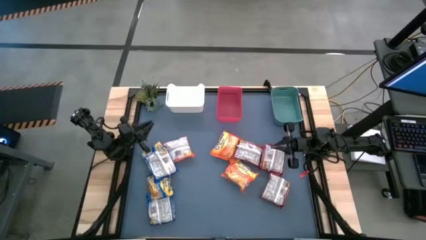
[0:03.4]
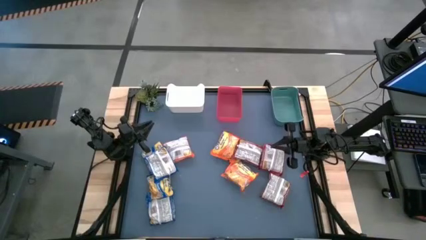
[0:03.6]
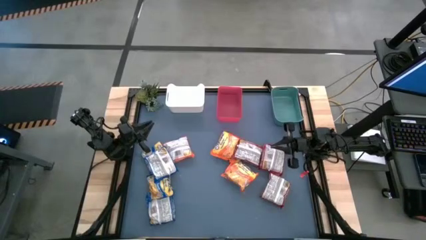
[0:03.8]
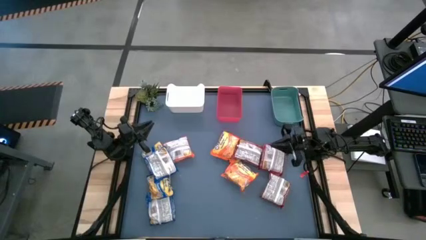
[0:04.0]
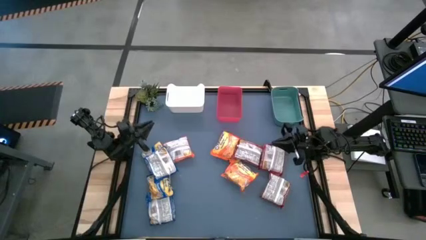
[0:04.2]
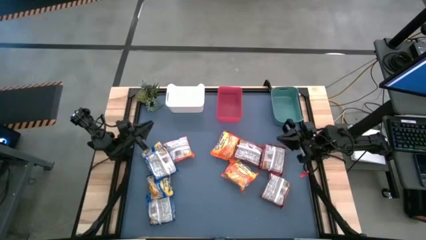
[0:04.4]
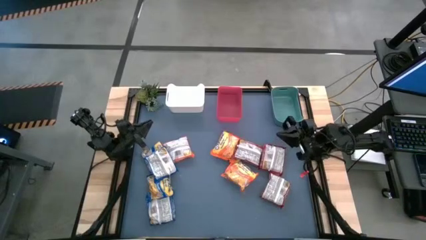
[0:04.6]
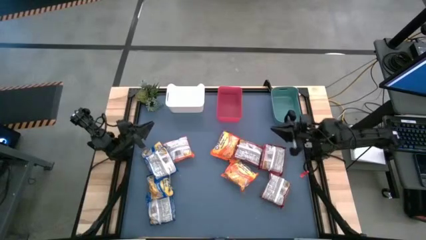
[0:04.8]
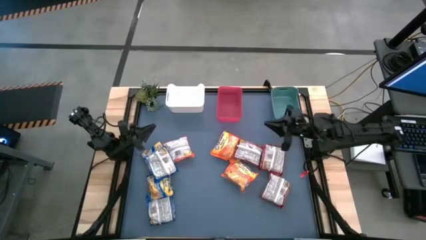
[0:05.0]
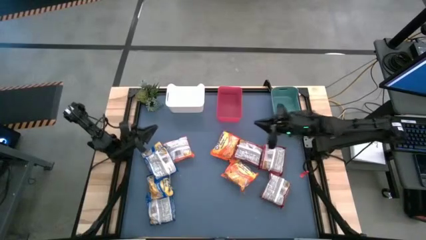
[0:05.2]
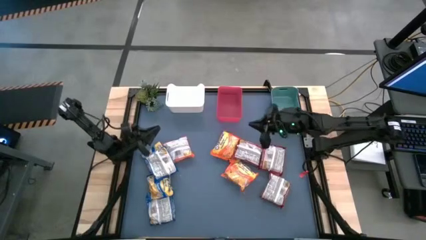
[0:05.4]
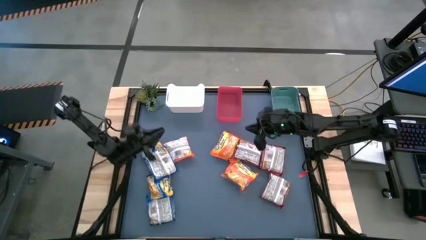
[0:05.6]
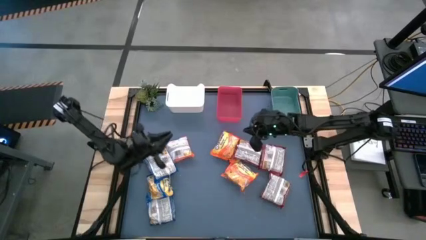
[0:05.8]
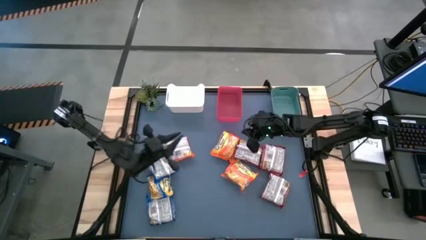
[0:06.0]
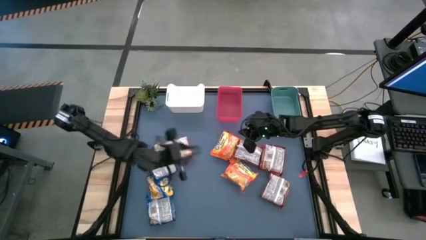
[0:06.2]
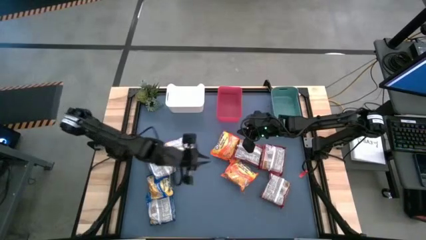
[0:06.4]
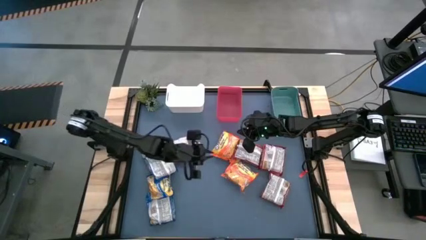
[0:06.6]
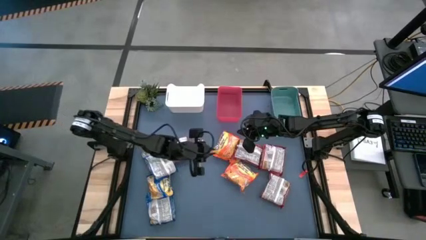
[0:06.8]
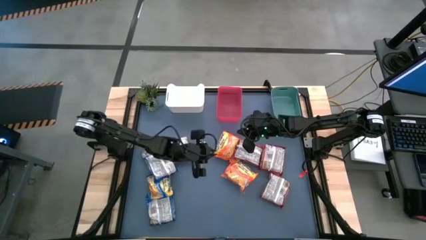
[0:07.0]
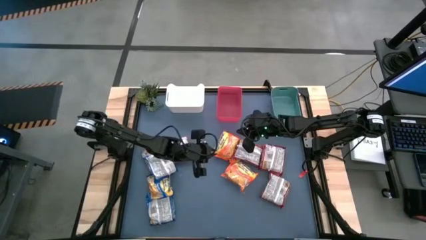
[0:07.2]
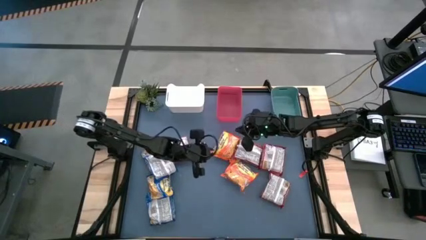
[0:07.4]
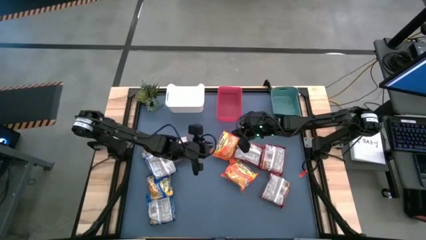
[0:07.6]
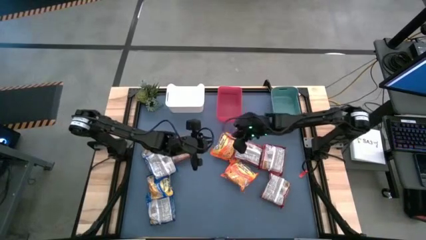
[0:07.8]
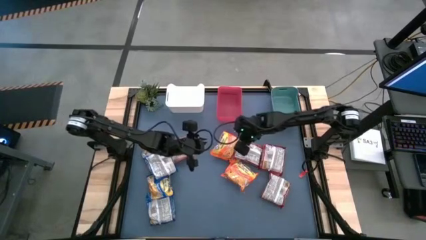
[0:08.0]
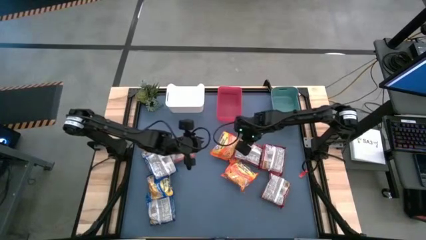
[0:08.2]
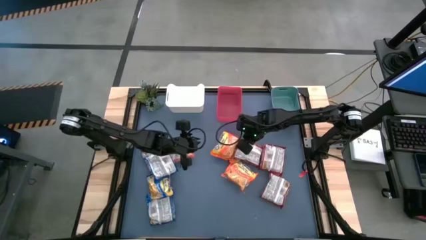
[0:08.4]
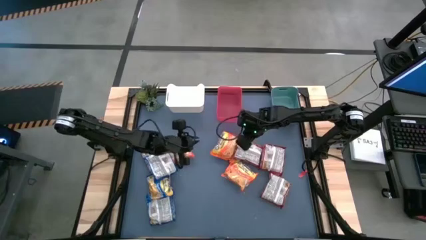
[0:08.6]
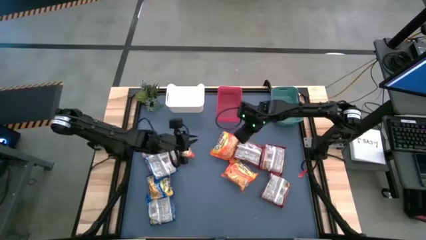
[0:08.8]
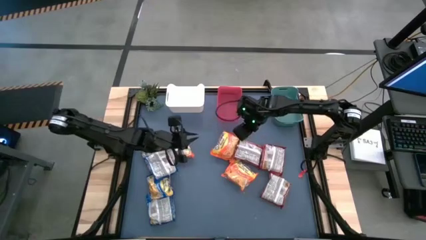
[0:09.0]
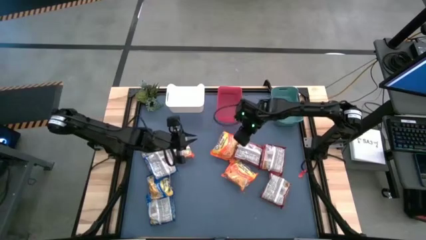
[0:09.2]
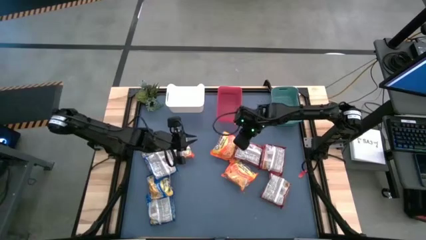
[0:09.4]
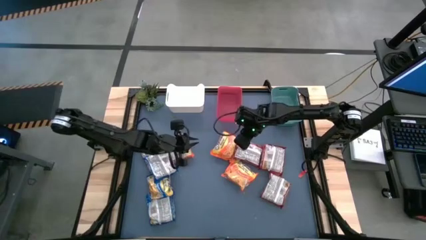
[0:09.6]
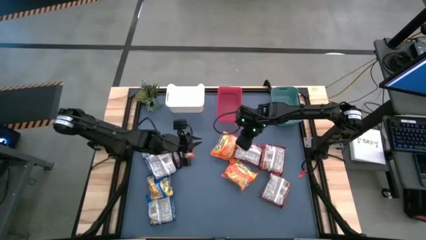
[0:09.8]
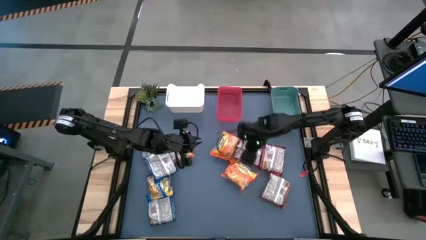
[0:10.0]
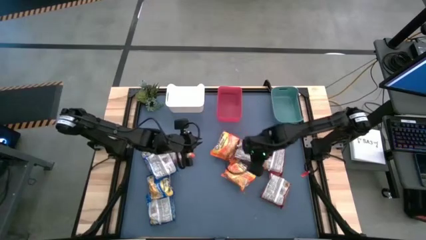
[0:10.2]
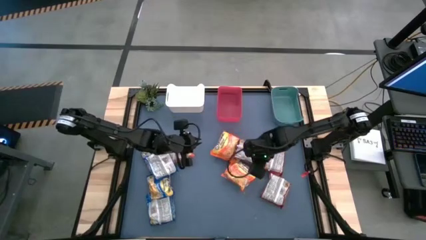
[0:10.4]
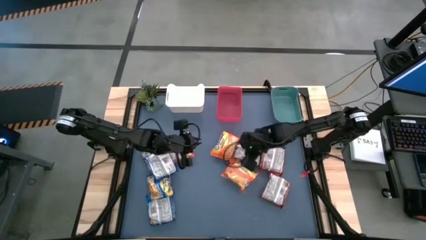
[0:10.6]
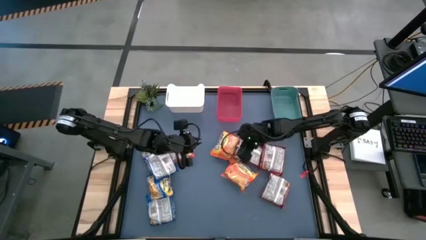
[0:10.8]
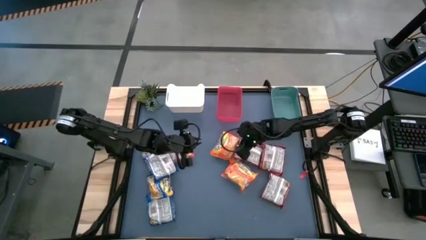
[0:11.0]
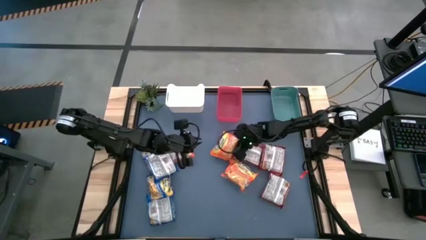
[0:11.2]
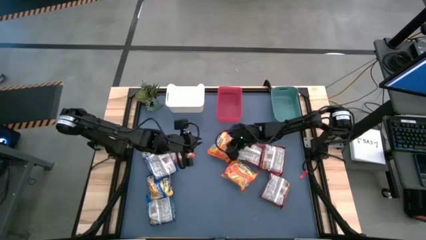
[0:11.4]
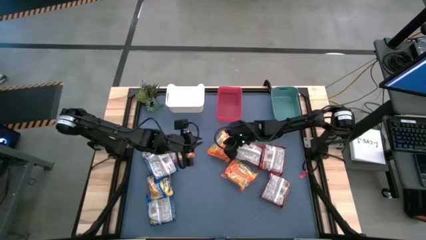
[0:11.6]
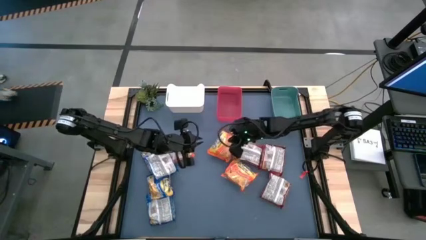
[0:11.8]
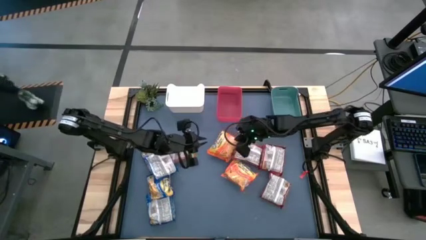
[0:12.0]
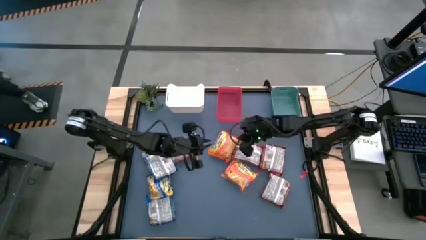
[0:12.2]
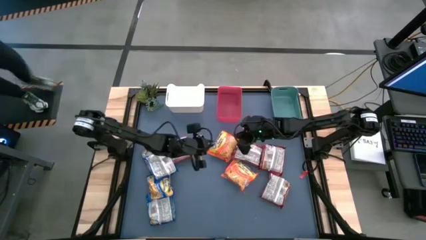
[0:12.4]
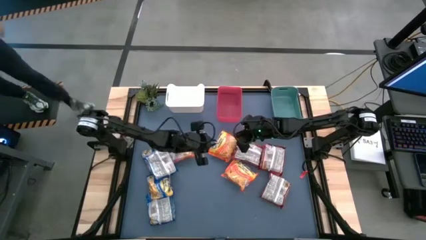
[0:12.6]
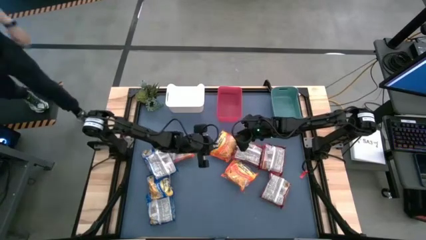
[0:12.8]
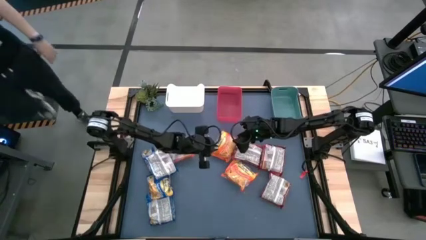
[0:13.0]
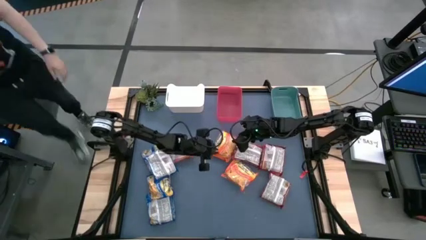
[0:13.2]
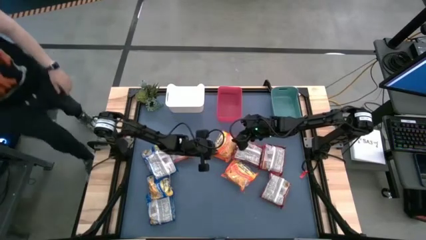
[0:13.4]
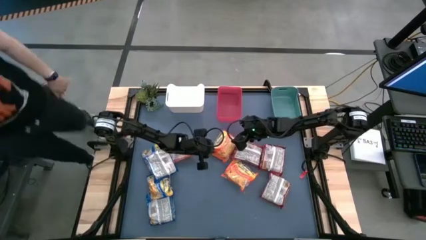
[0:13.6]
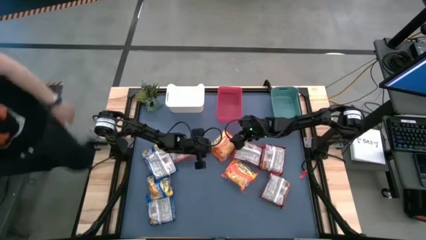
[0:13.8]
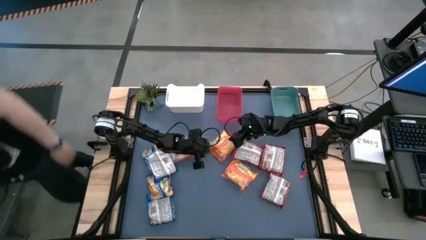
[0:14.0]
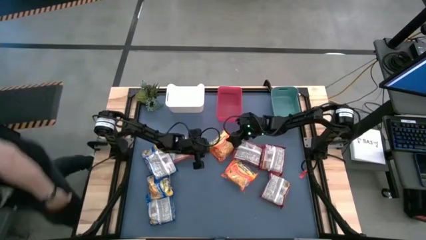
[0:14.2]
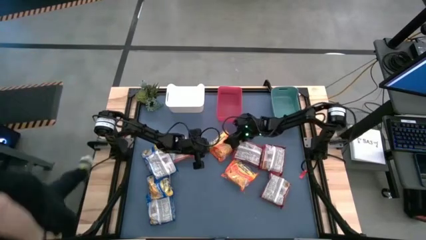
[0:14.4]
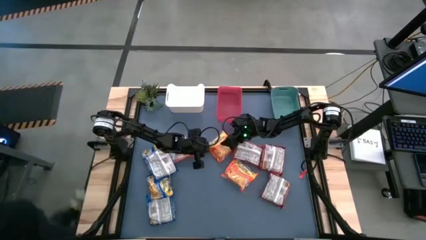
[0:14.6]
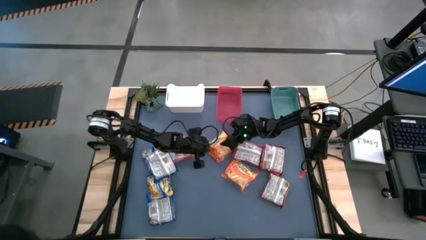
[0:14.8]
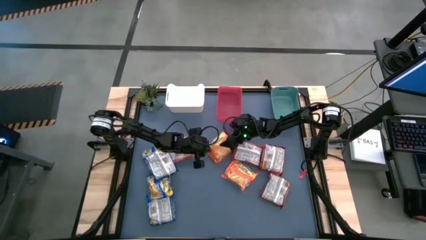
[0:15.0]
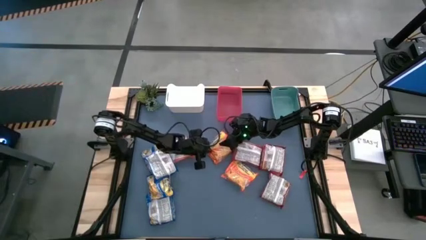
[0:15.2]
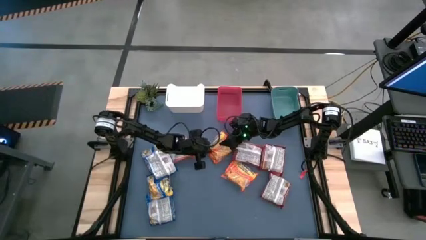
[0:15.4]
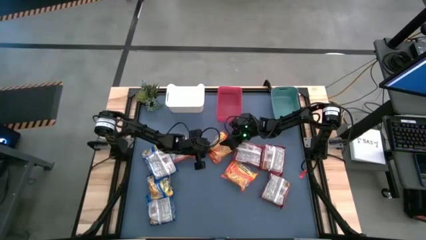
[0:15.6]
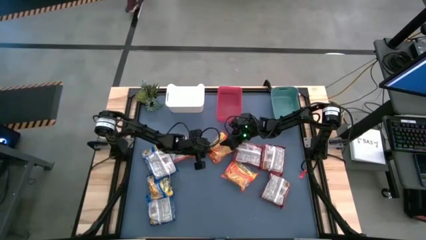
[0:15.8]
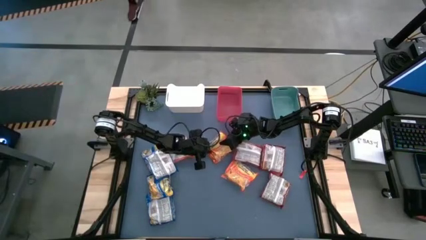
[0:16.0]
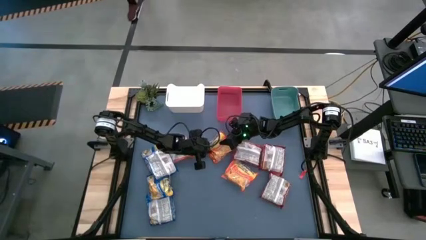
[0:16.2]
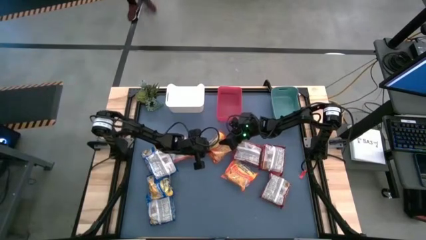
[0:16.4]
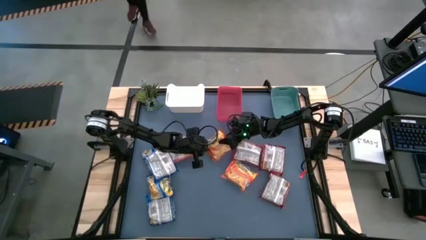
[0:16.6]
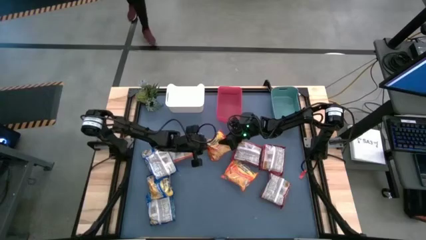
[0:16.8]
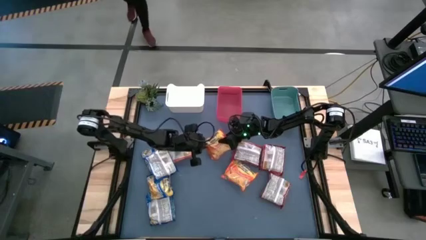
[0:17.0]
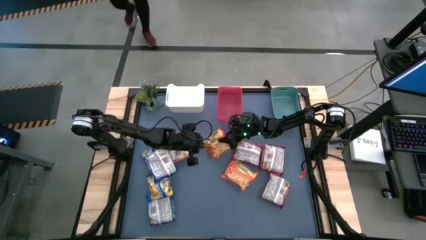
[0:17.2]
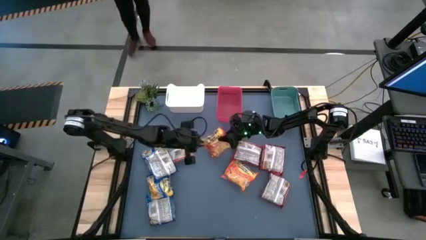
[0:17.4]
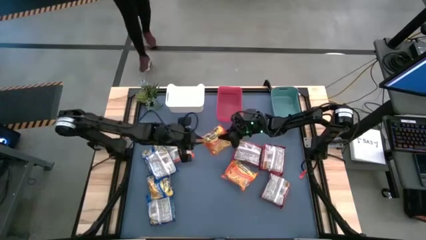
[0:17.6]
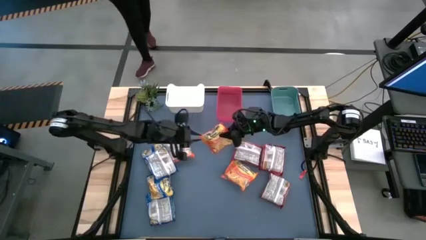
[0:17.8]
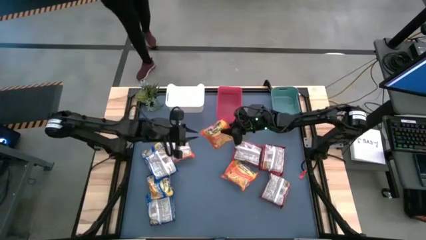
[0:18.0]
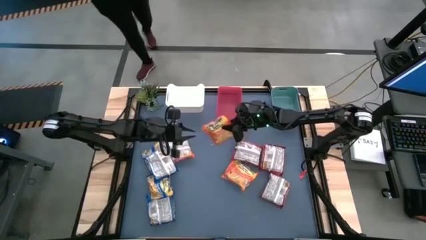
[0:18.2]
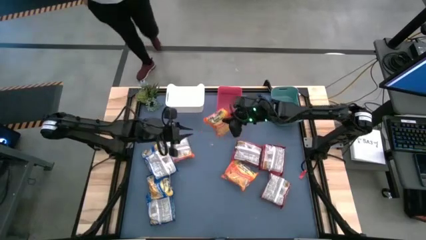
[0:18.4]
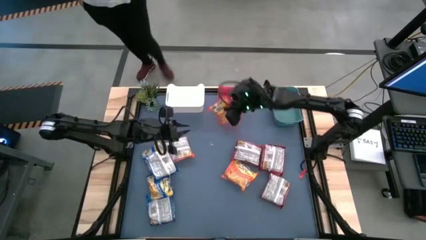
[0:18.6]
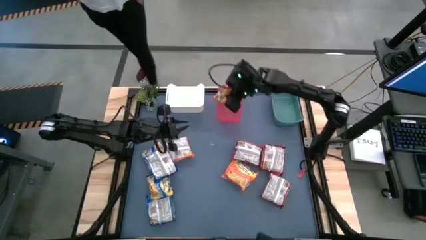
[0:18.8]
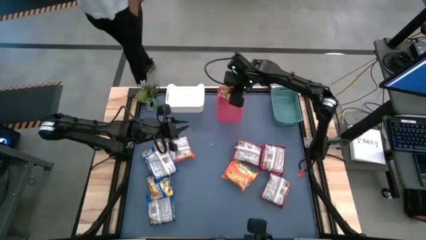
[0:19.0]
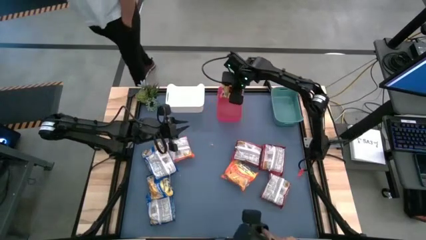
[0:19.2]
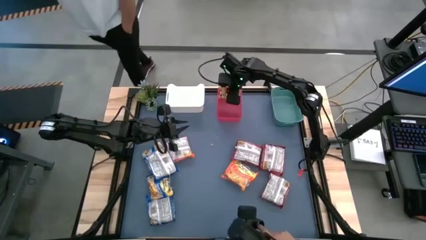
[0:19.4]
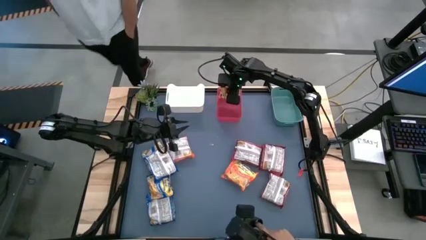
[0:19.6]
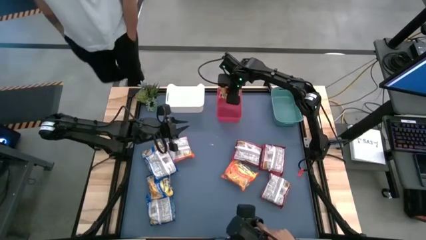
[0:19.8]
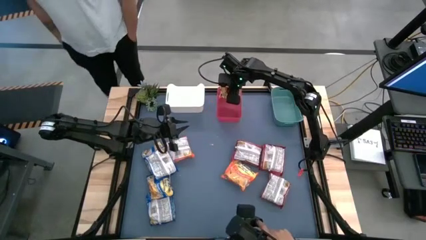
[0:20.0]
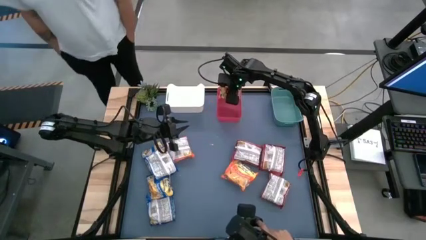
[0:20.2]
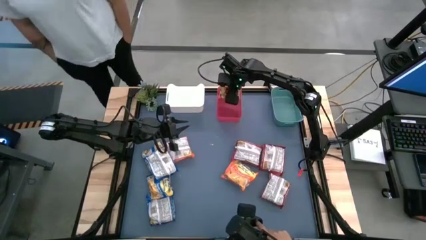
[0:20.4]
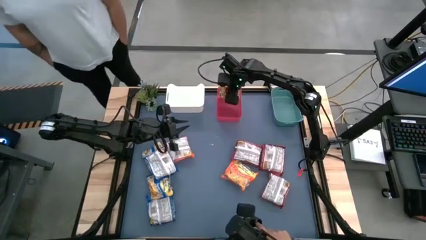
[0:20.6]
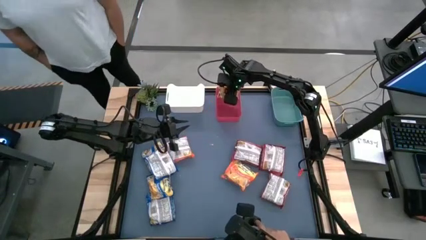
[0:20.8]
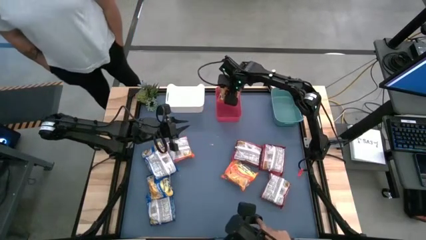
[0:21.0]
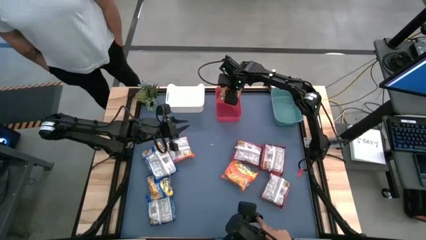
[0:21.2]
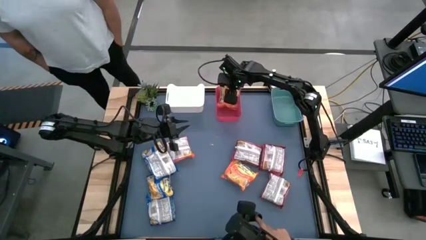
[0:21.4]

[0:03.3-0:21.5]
Task: Sort Maruchan noodles
Put the top right orange noodle pack into the red bin
